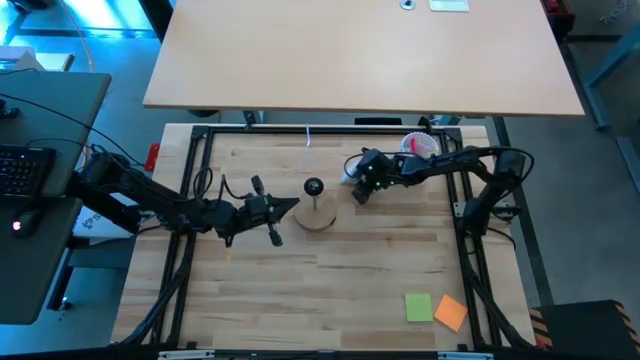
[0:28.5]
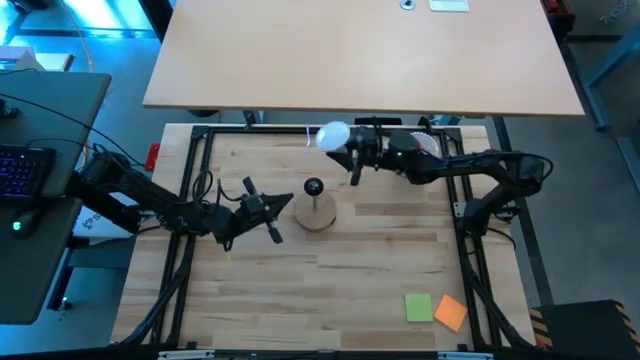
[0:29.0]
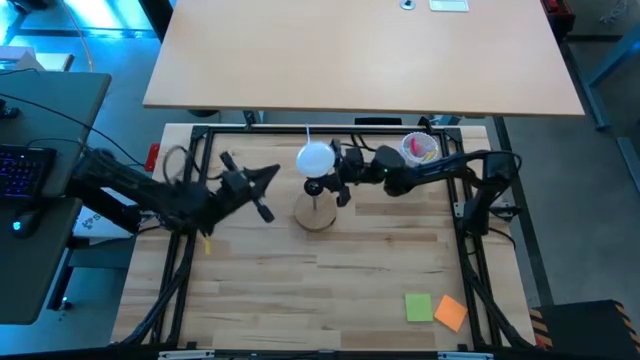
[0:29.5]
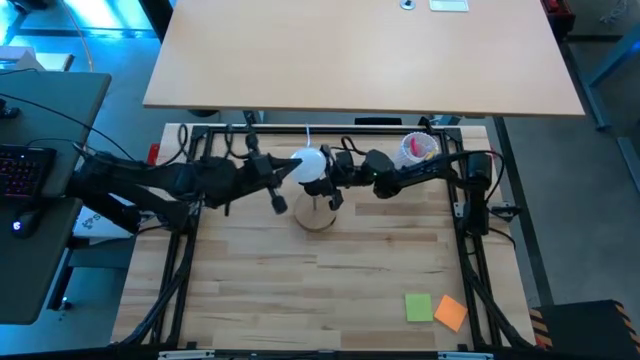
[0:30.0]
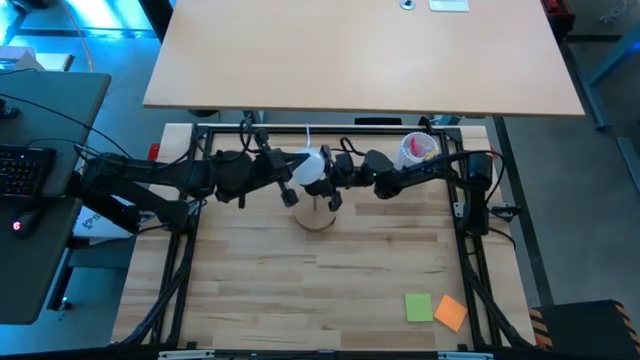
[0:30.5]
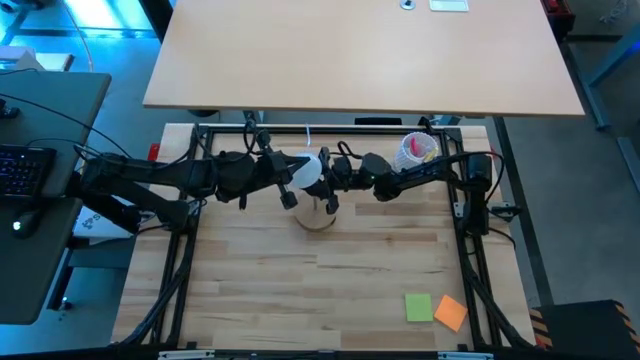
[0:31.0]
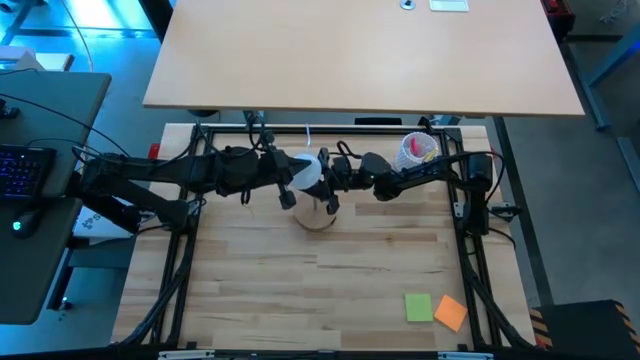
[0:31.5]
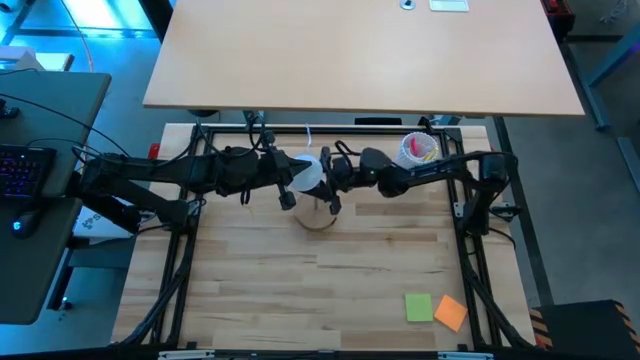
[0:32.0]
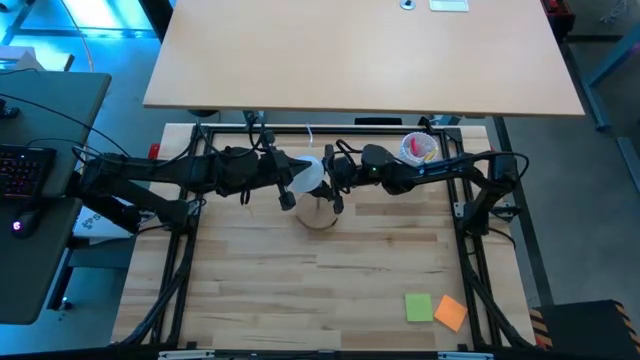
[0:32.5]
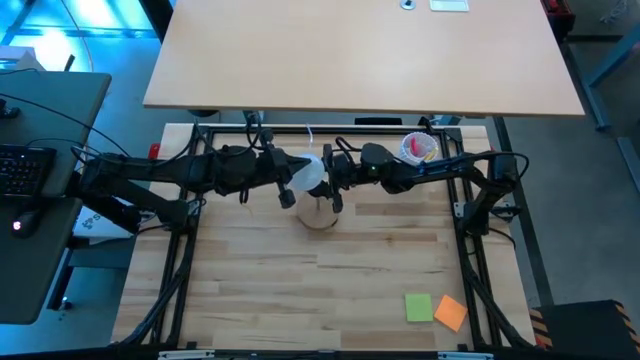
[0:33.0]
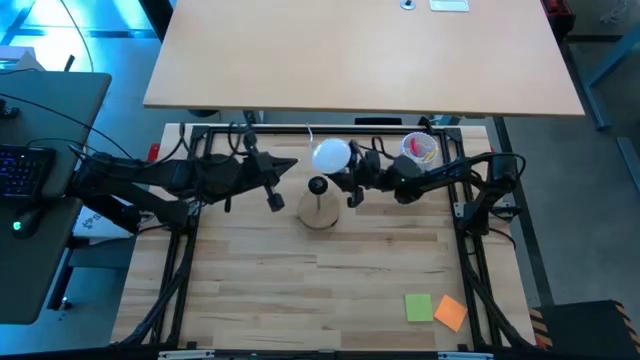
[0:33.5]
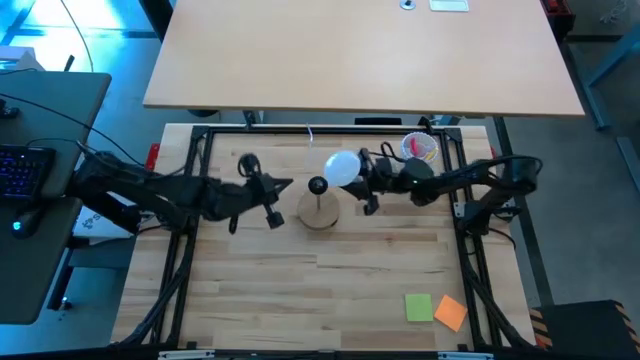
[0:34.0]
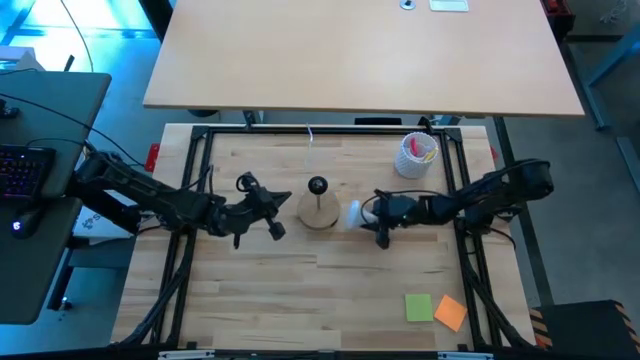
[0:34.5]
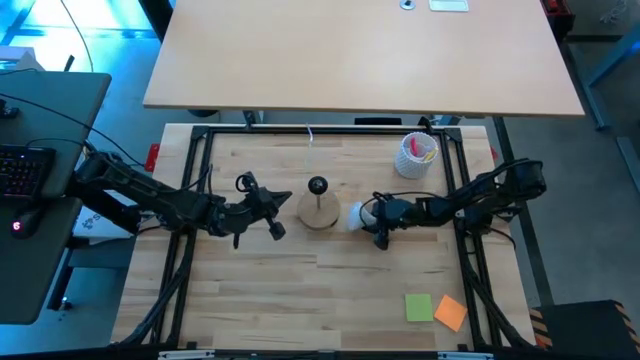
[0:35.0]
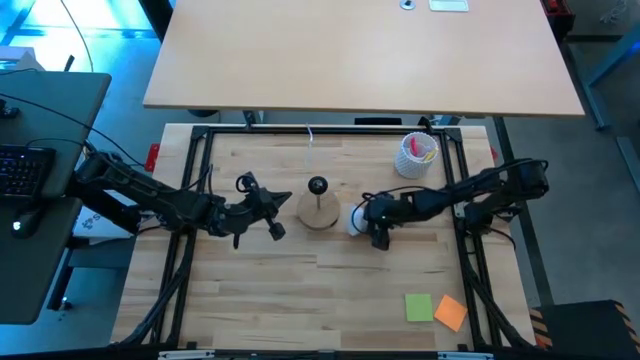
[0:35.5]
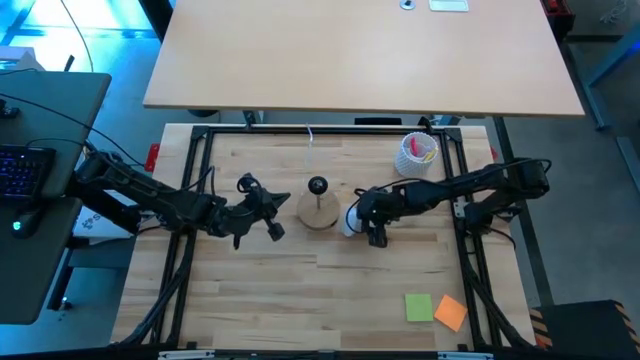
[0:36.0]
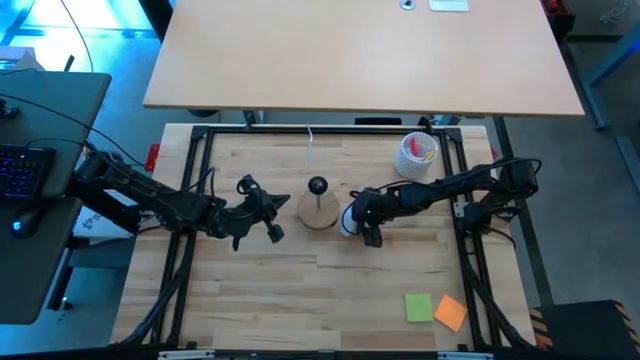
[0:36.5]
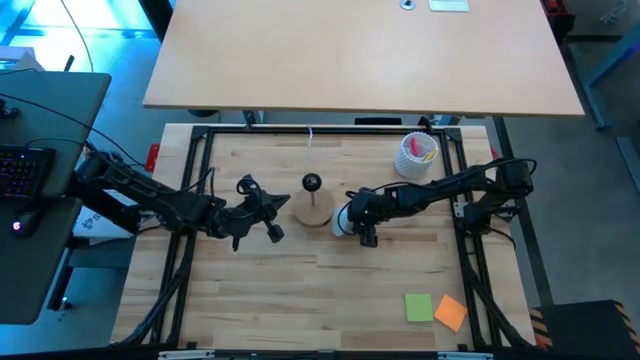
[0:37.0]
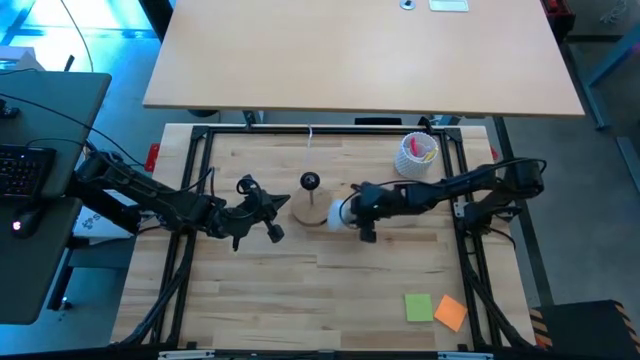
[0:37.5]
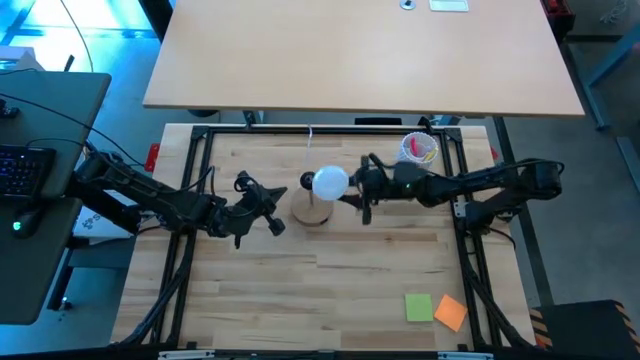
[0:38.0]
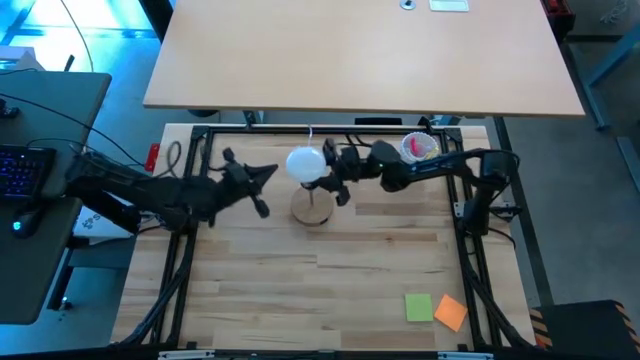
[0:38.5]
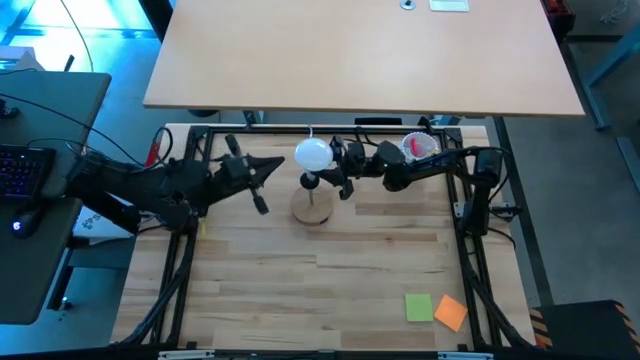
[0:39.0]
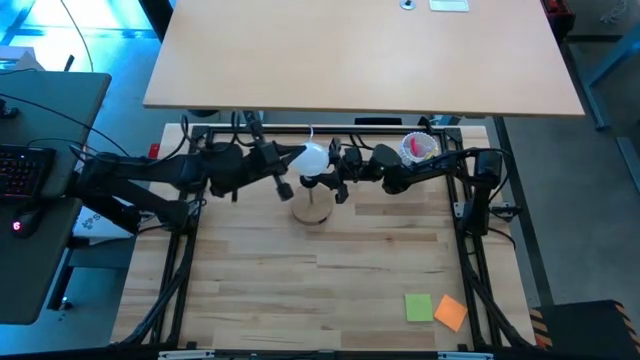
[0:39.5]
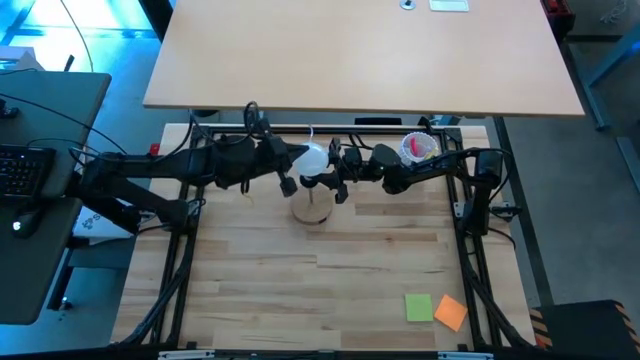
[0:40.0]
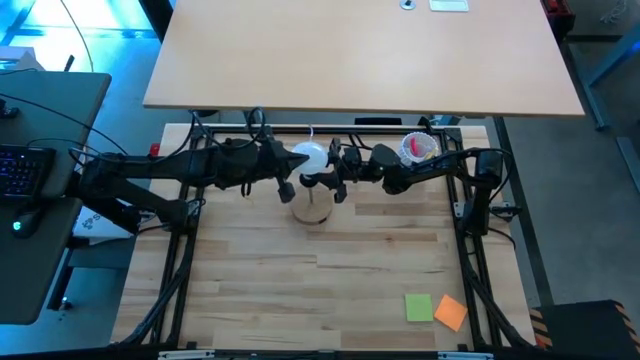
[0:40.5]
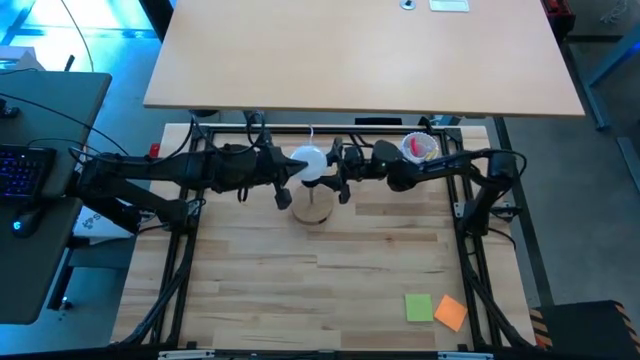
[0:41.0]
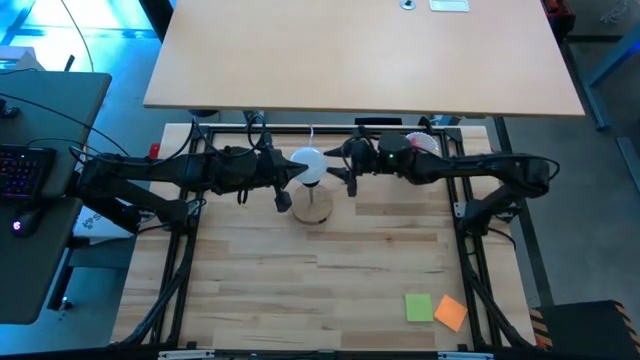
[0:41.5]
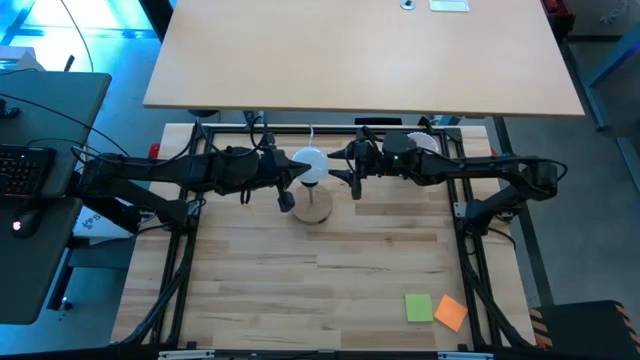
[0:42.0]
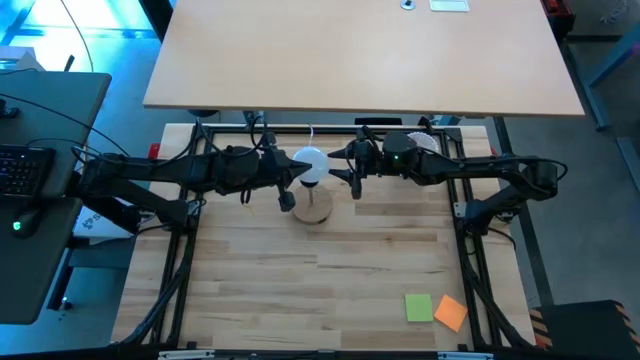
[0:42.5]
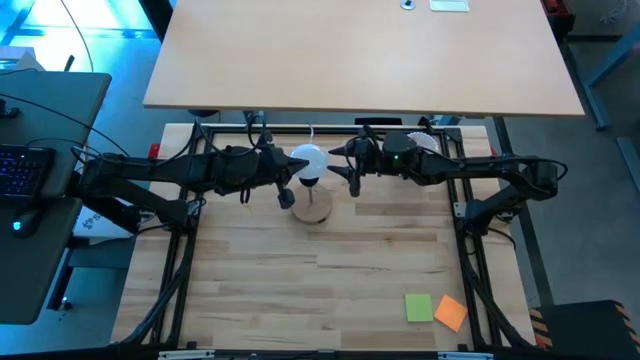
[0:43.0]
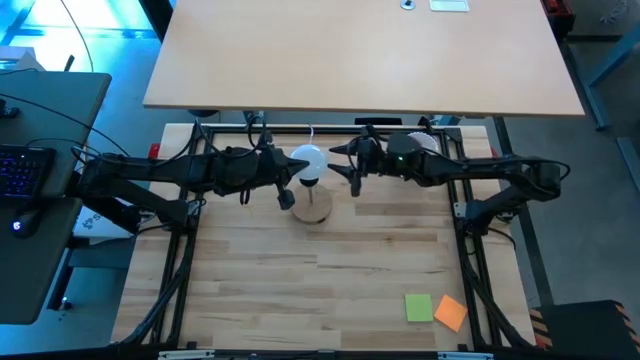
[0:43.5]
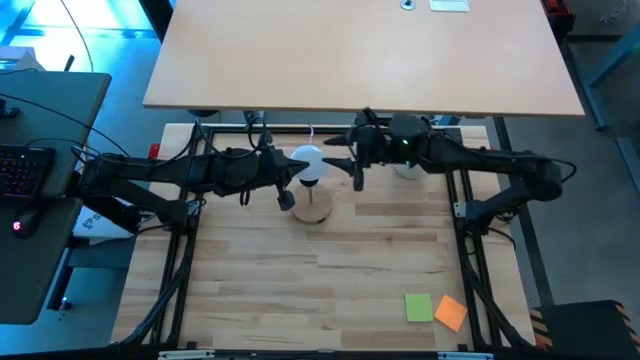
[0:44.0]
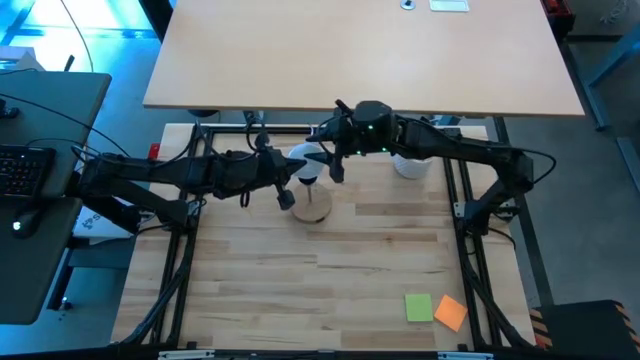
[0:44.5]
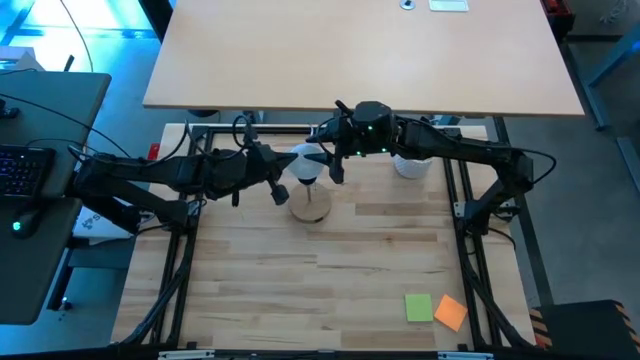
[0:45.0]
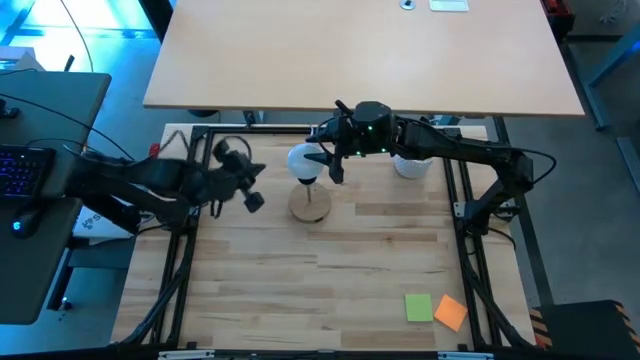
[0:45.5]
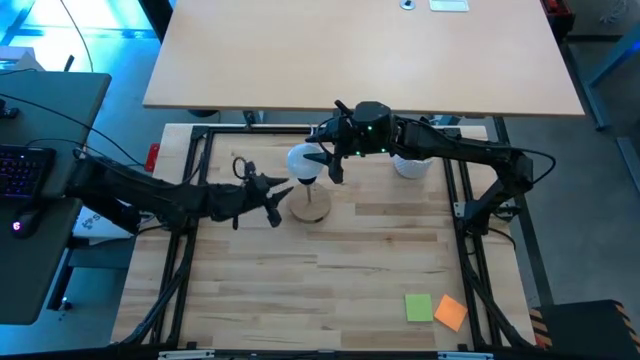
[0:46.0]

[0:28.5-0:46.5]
Task: Screw lightbulb
Insert the lightbulb into the brown lamp

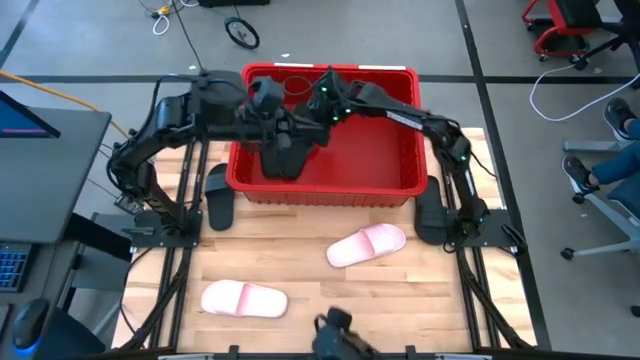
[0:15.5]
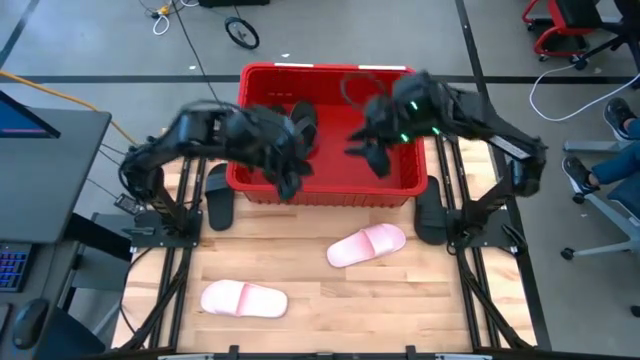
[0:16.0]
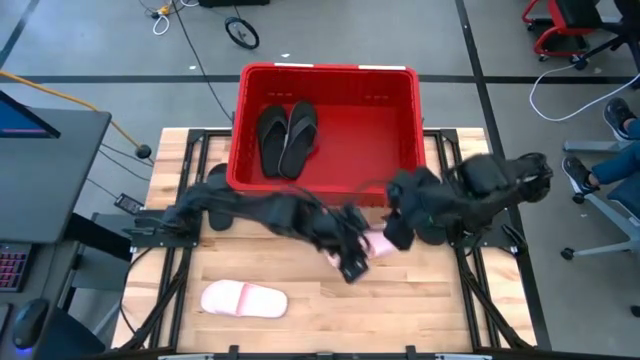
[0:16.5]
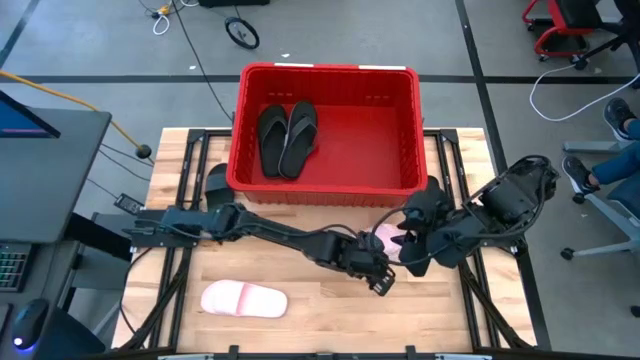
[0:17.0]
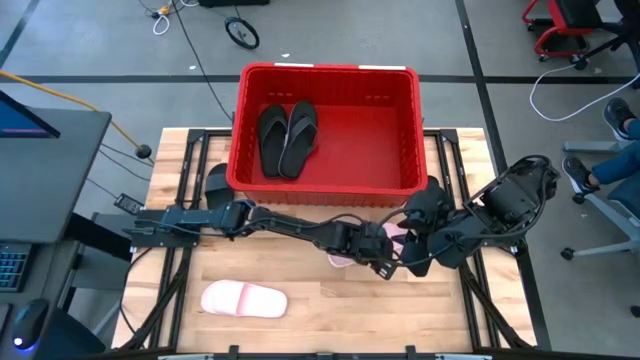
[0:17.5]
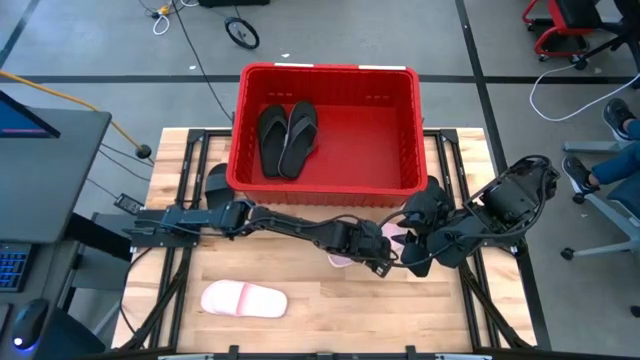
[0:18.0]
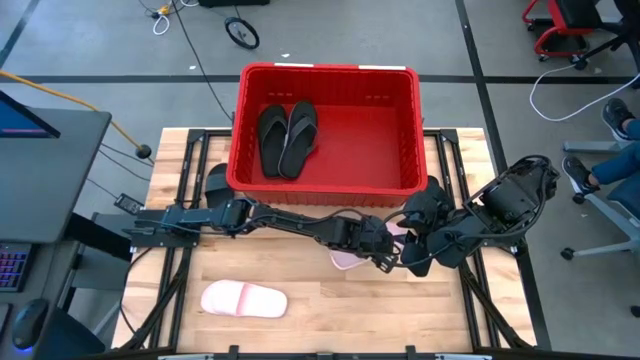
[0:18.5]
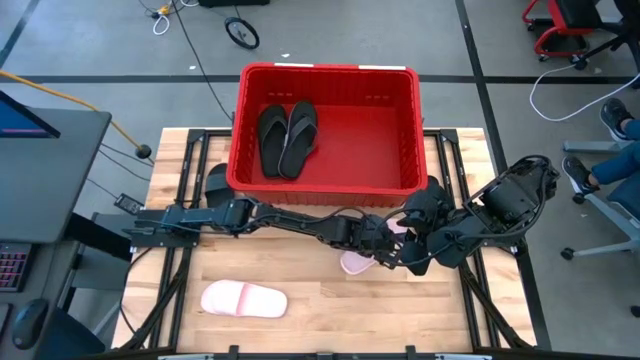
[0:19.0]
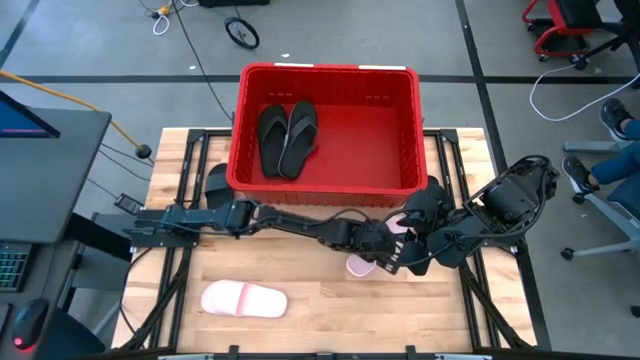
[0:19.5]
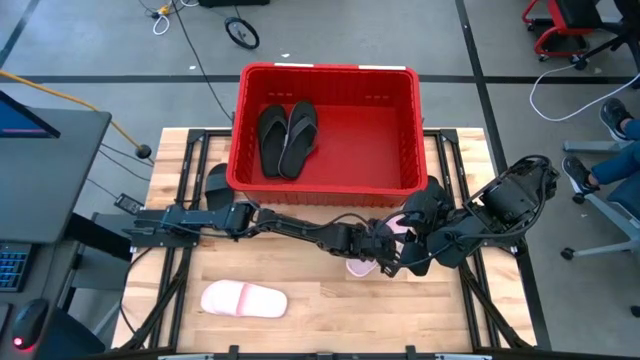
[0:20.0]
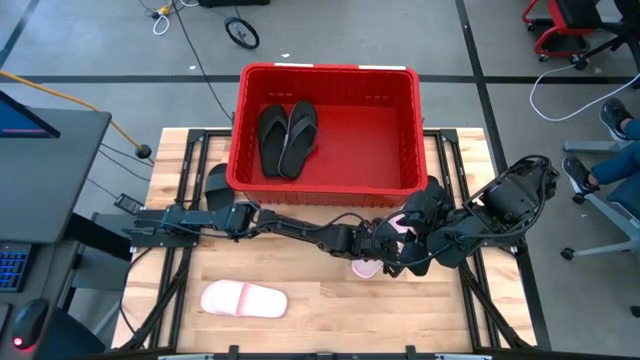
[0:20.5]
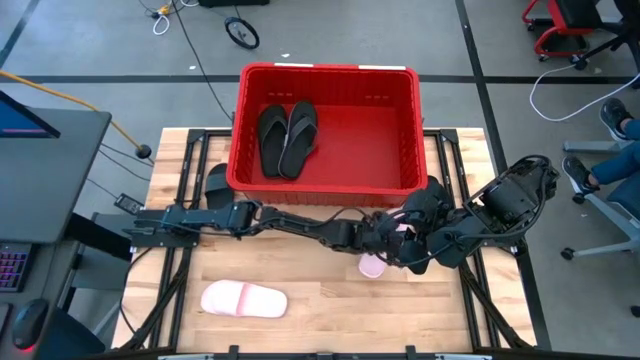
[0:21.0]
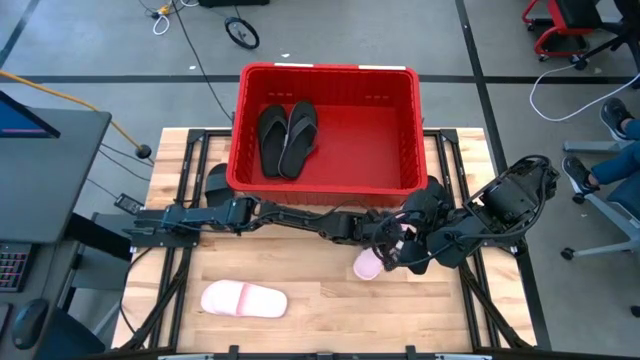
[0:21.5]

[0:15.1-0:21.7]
Task: Pick and place slides into bin
Put the pink slipper into the red bin
